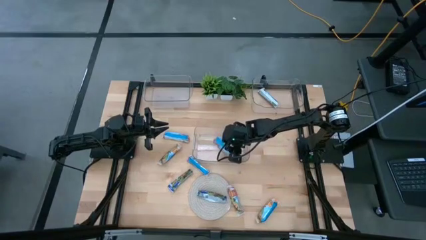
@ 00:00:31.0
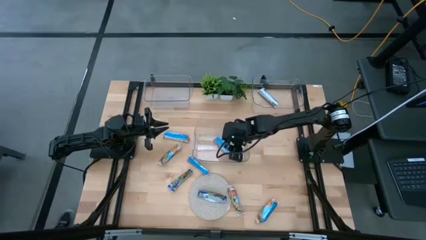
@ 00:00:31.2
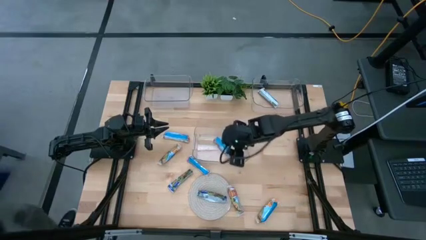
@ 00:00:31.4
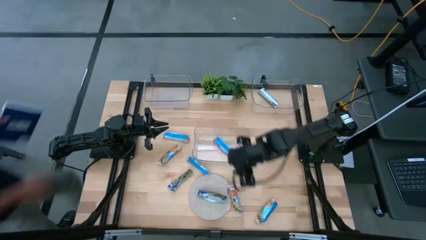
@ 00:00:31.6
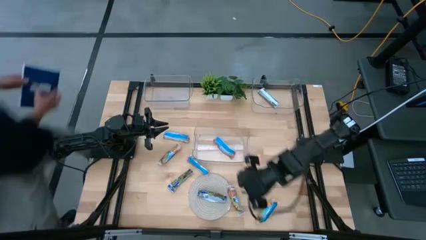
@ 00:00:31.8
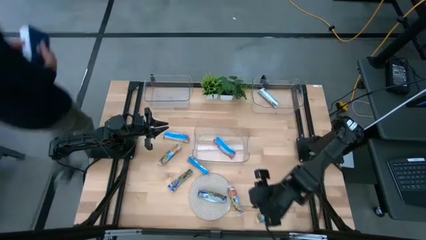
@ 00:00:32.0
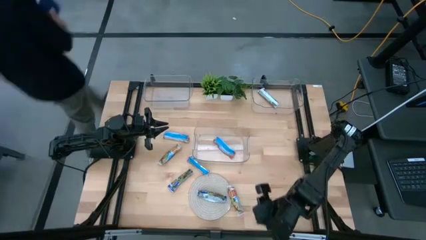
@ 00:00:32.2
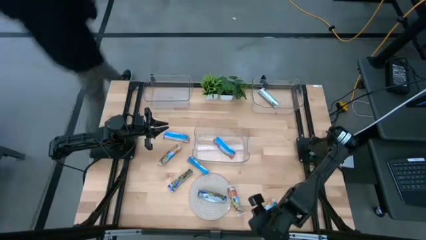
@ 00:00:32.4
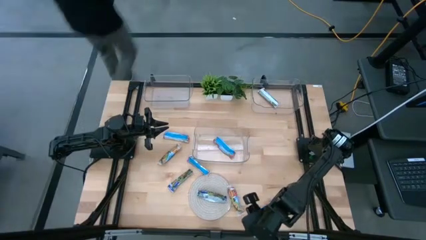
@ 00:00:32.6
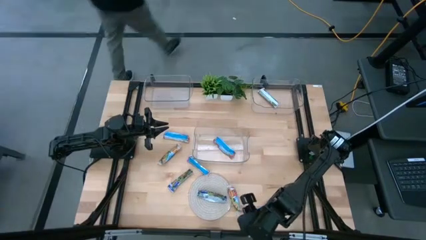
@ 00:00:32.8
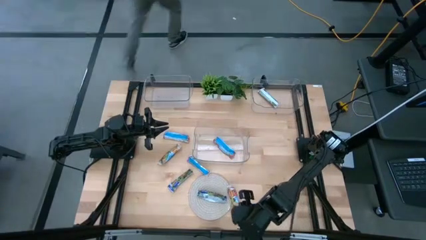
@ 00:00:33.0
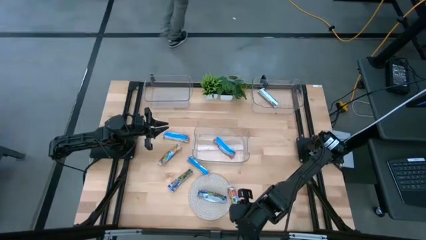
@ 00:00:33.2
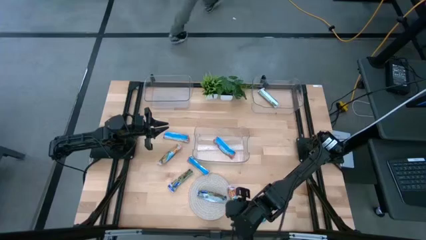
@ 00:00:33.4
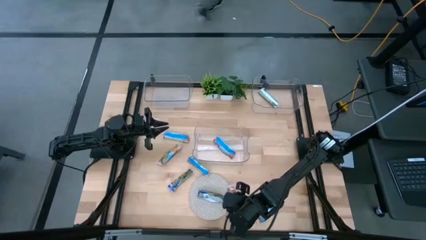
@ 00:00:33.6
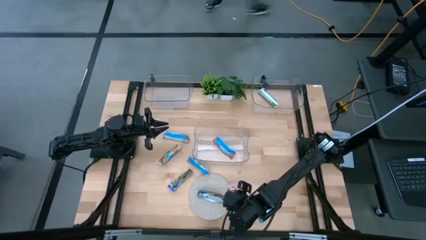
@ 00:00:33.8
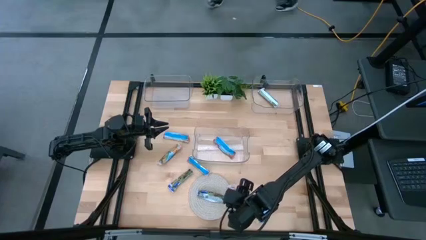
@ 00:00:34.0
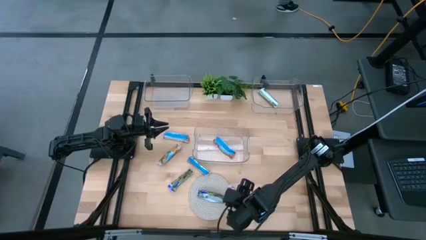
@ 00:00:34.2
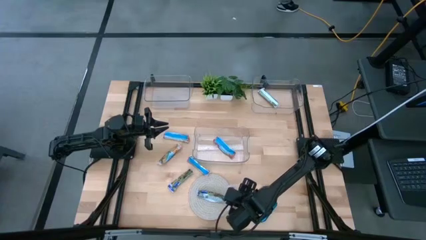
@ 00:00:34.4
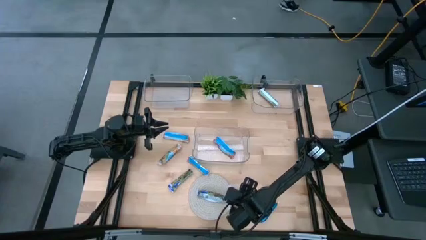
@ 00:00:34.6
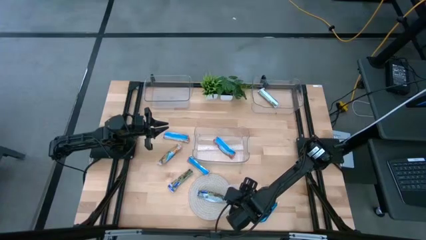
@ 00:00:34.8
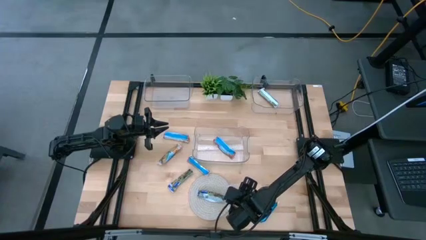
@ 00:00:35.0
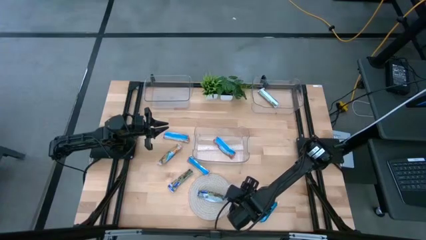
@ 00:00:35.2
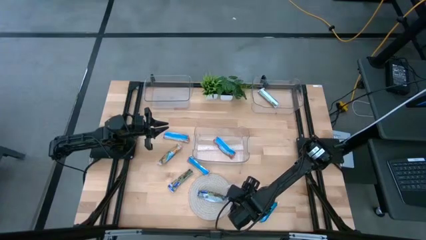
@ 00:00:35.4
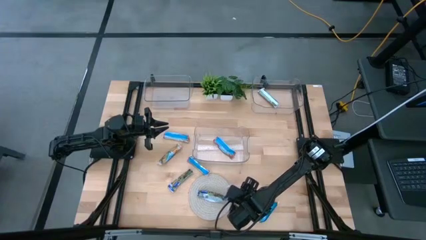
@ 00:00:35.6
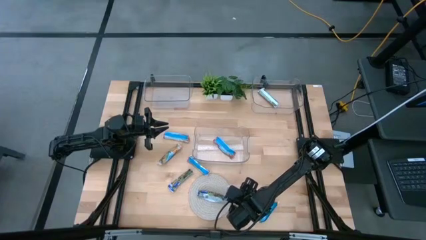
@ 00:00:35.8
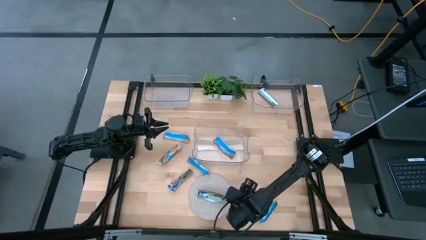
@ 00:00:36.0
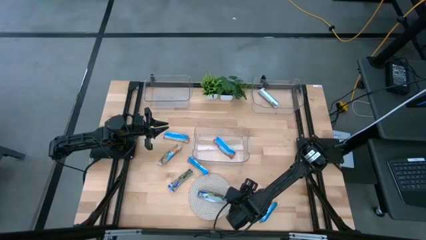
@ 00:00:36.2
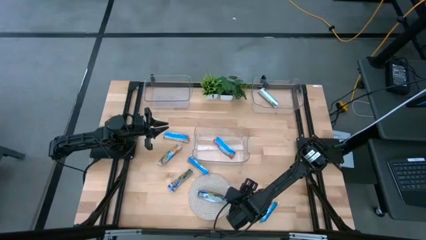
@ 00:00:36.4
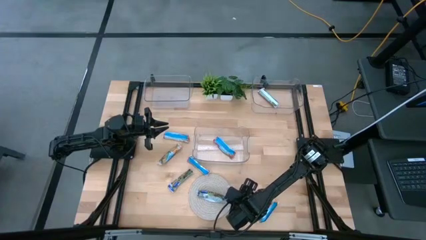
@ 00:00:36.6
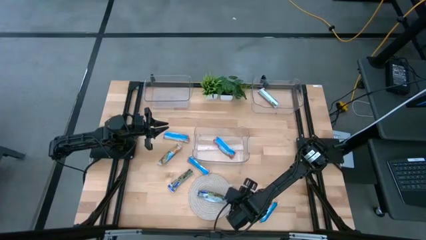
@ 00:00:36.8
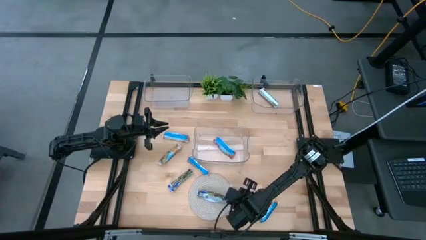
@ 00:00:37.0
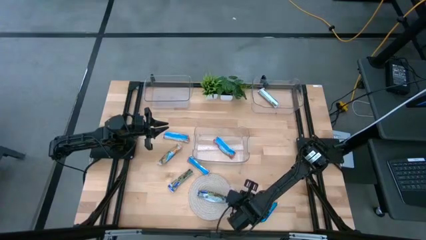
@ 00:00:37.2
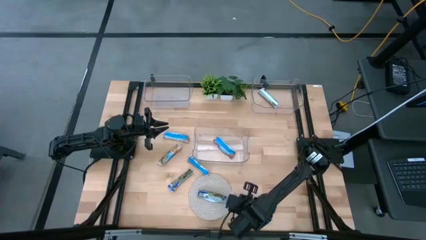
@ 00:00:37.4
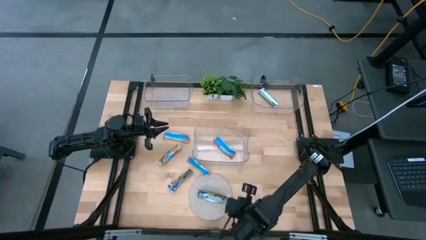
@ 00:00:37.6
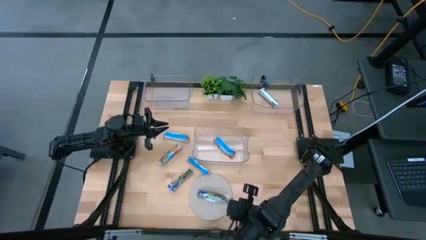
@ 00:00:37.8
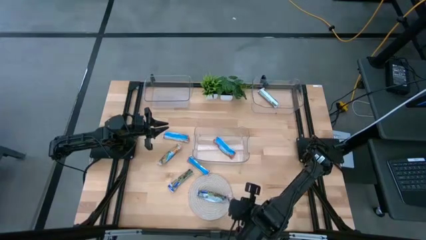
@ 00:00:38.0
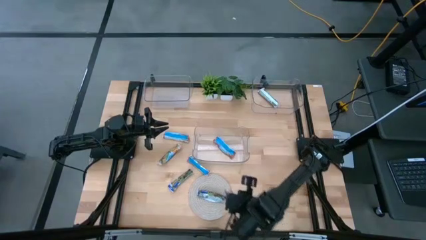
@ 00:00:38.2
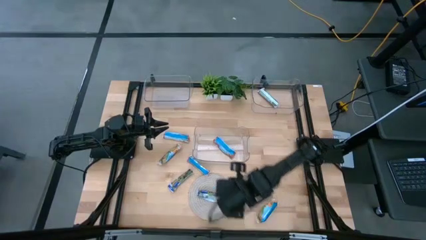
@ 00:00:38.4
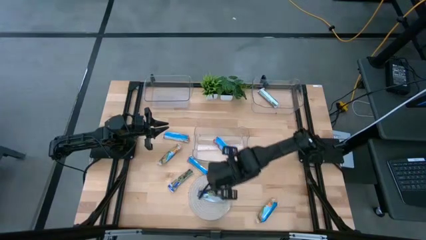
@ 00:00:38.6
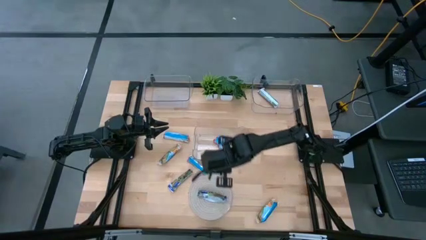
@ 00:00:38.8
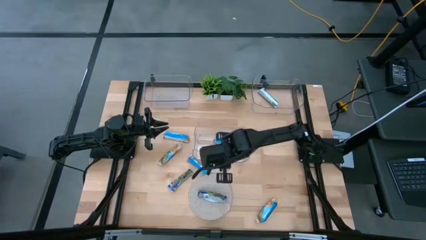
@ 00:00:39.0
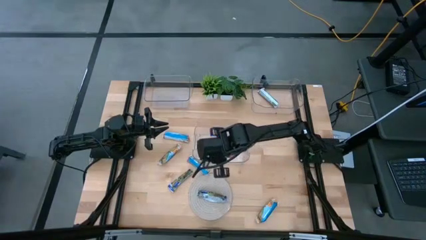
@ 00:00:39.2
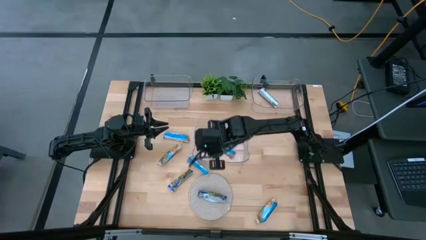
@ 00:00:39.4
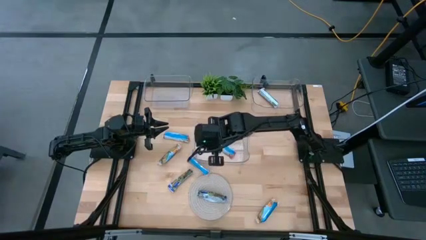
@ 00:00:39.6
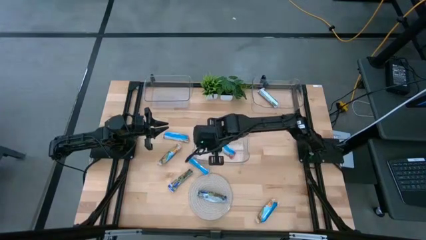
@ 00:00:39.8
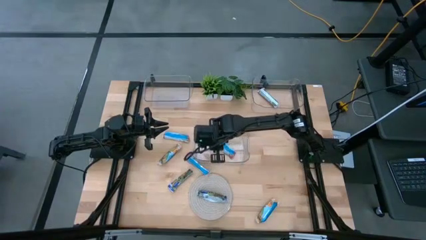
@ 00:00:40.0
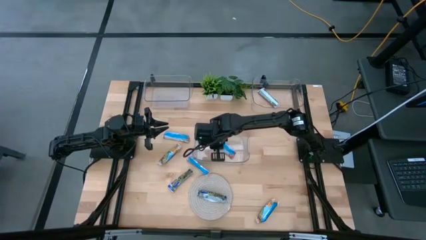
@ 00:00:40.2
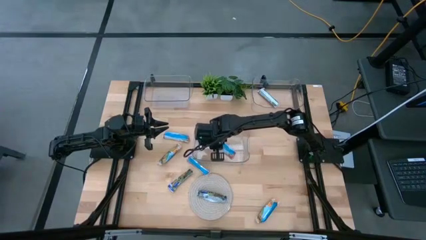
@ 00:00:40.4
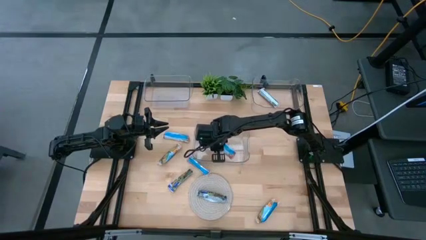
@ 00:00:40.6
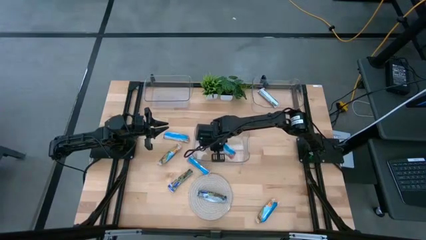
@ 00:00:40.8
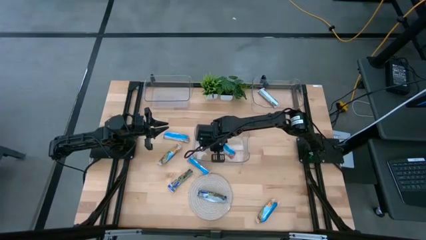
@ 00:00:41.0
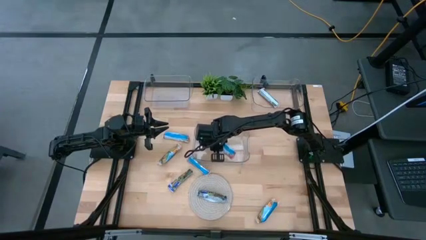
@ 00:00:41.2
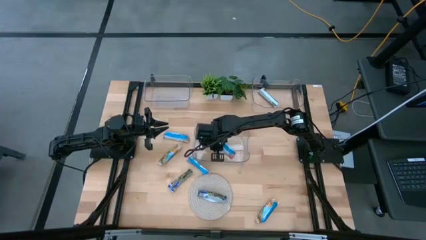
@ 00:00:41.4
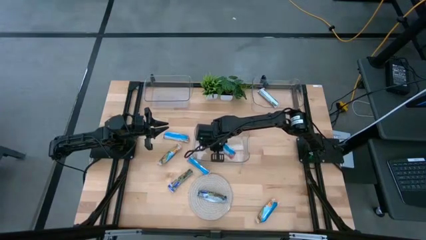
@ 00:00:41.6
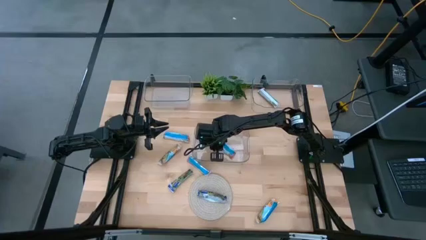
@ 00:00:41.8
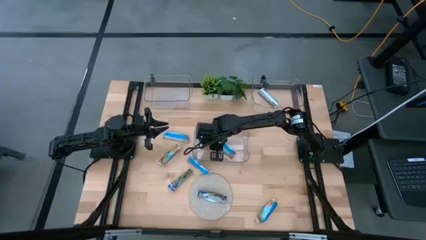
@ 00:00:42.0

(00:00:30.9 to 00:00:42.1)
Task: Pick and place Granola Bars by type
Put the bottom red granola bar into the middle transparent bin

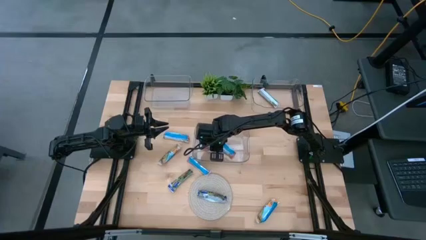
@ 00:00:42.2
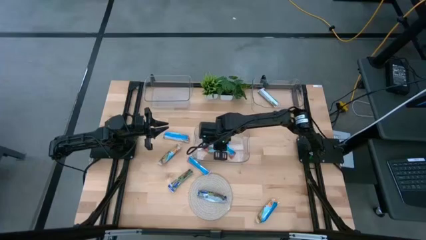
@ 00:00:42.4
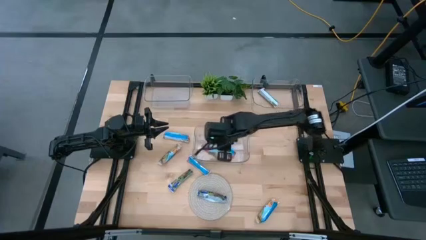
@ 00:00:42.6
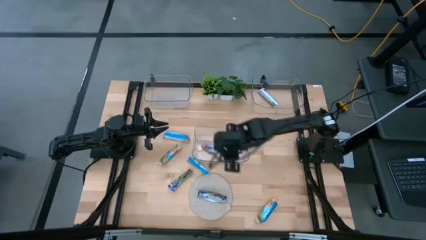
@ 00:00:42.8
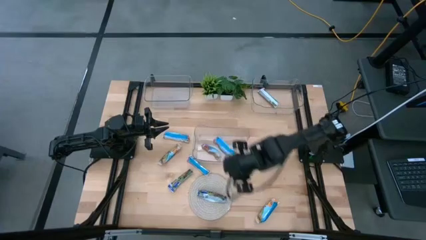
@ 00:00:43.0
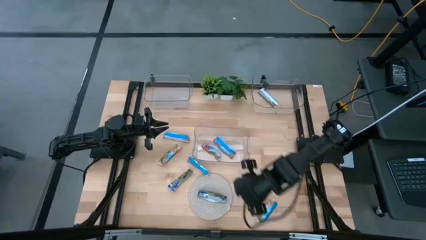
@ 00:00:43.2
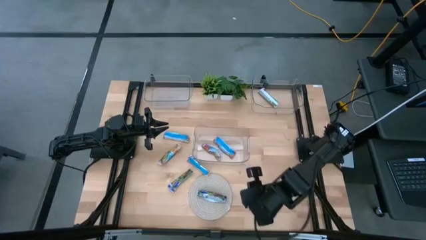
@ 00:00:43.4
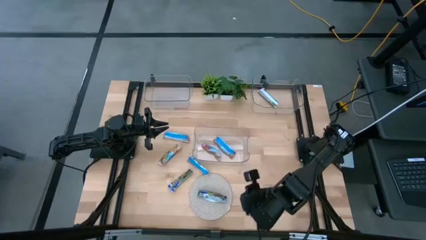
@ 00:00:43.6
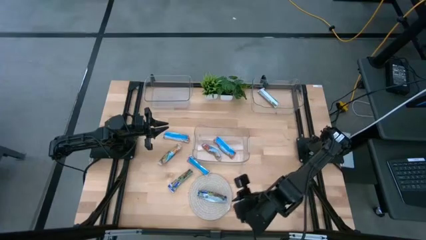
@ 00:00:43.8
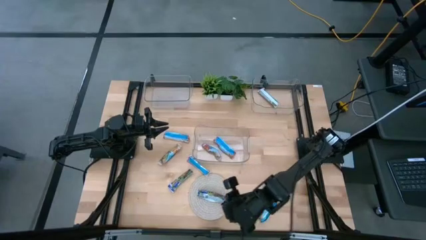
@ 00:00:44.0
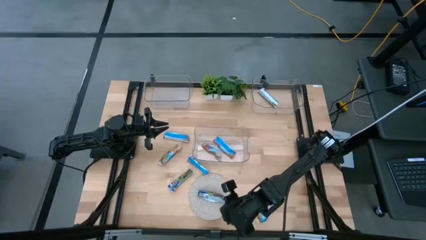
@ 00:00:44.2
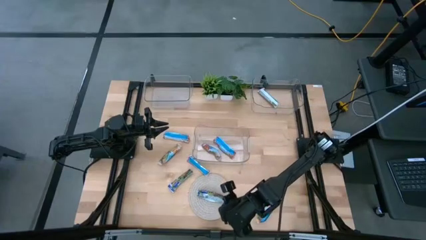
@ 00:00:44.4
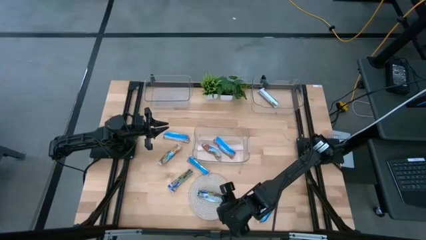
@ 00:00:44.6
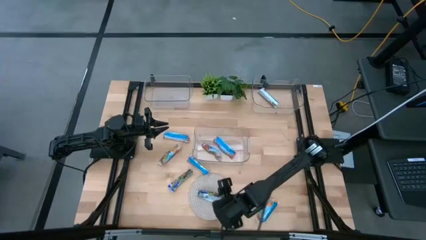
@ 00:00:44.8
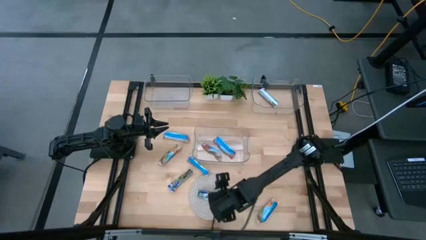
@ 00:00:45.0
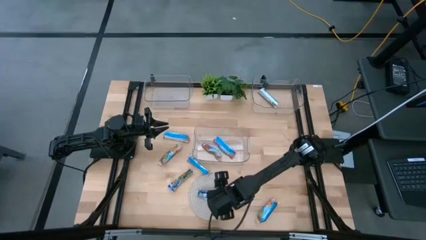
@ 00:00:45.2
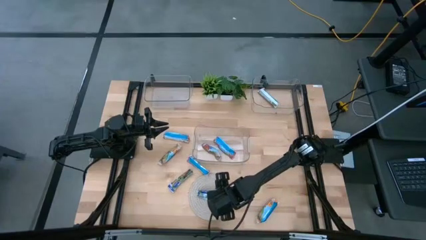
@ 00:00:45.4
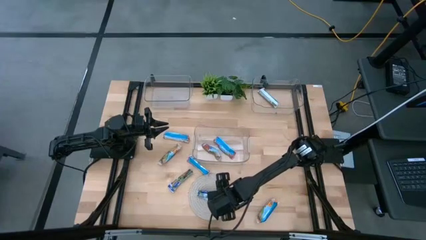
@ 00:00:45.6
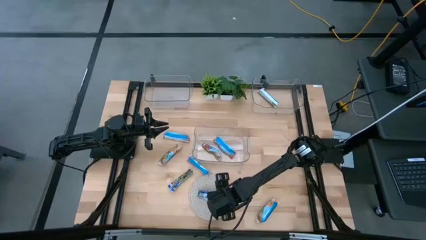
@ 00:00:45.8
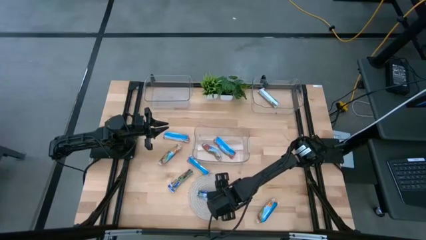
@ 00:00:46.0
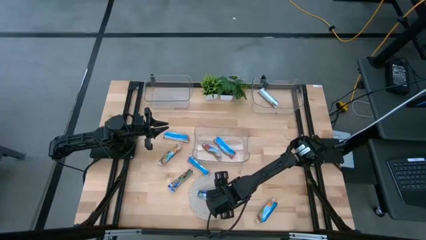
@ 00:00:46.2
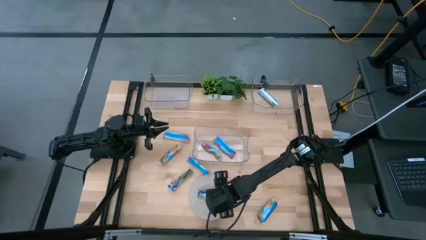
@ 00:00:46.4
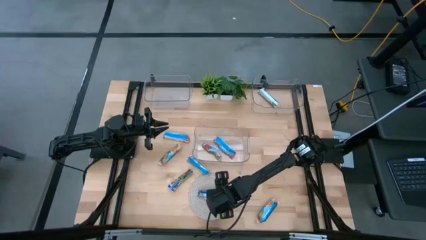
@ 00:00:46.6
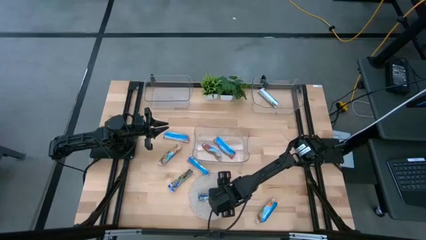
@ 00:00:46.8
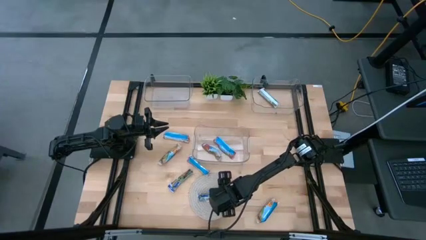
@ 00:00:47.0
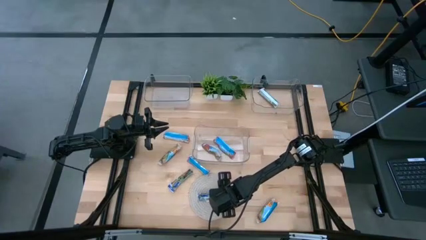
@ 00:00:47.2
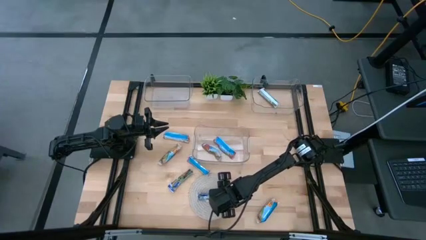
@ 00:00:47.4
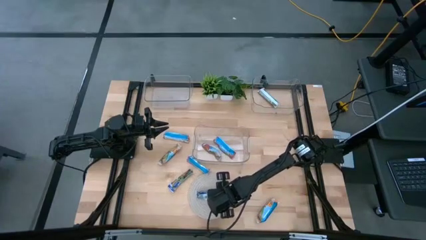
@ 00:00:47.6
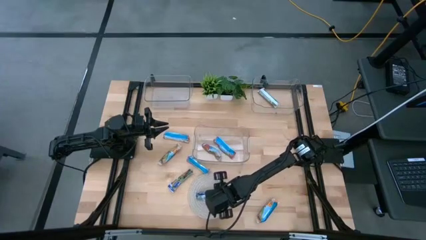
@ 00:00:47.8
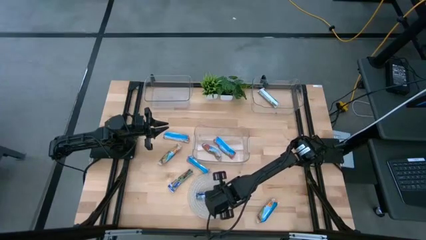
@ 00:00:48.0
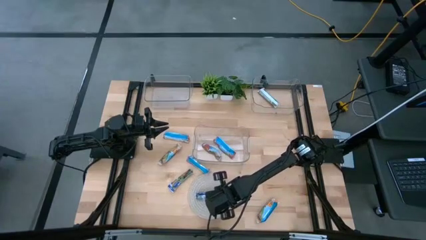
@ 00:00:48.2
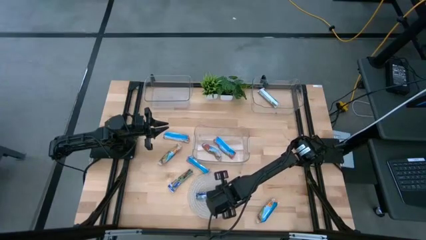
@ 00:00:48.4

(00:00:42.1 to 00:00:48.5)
Put the right blue granola bar into the left transparent bin
